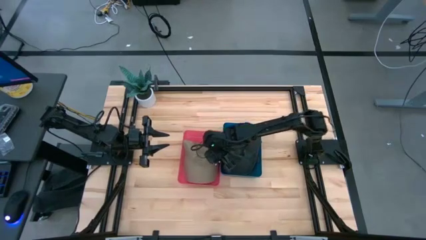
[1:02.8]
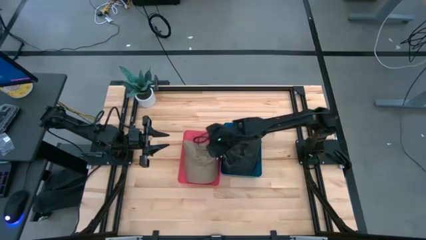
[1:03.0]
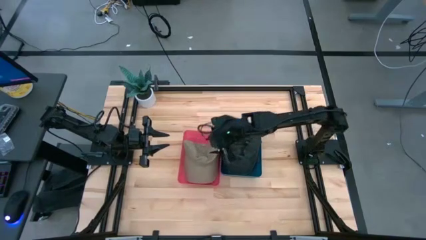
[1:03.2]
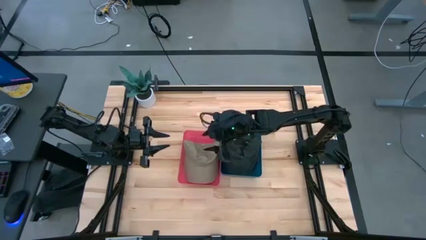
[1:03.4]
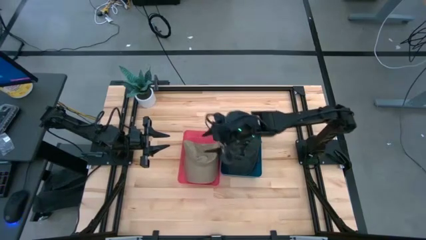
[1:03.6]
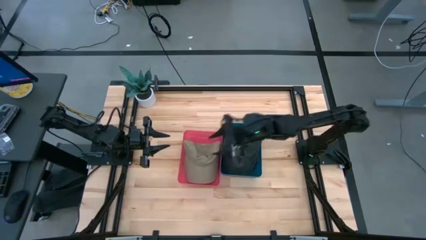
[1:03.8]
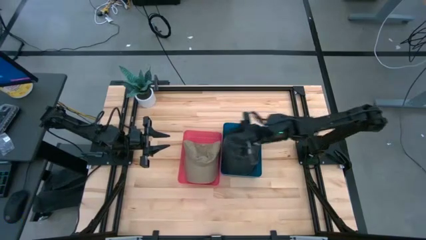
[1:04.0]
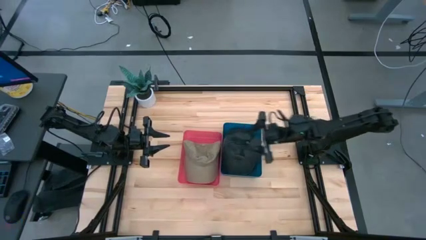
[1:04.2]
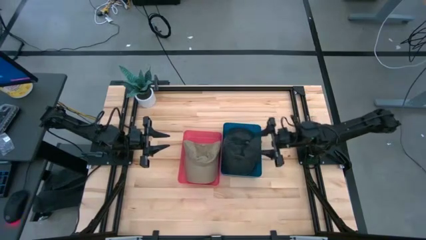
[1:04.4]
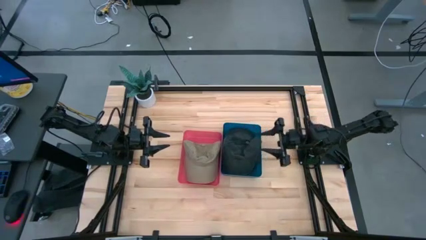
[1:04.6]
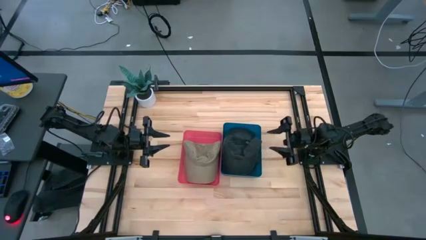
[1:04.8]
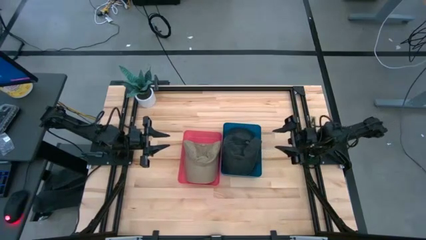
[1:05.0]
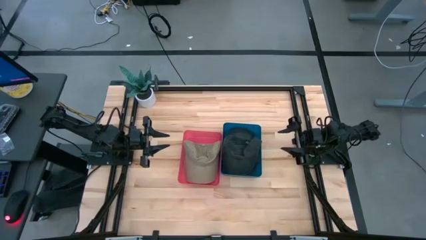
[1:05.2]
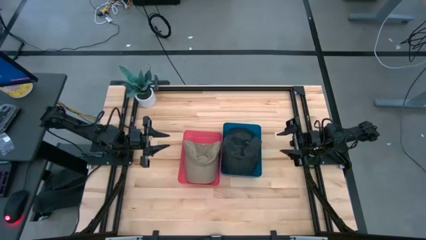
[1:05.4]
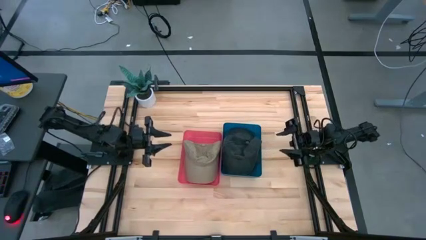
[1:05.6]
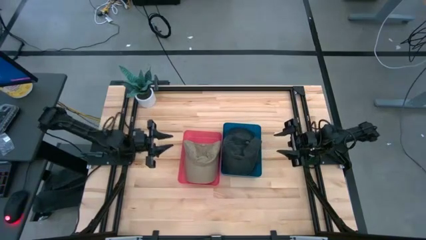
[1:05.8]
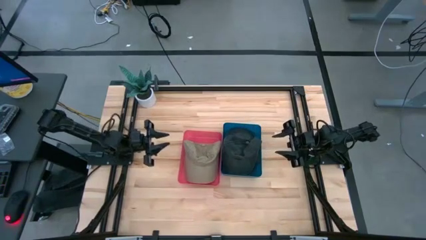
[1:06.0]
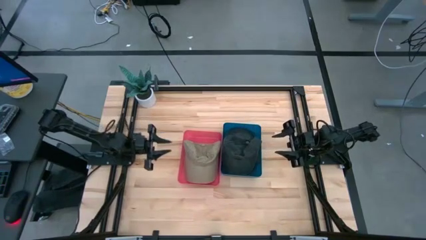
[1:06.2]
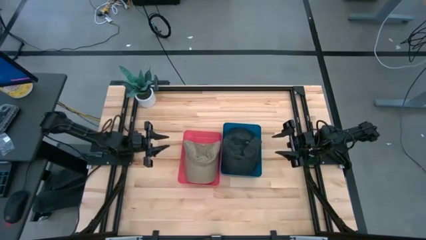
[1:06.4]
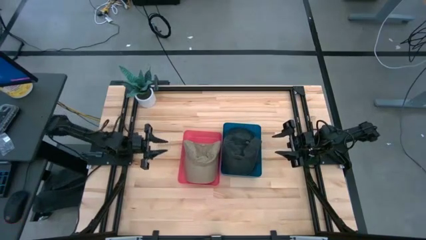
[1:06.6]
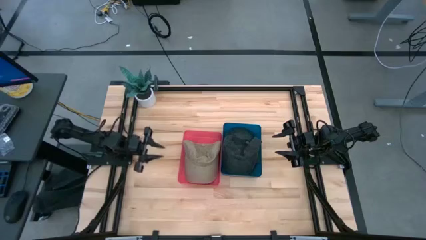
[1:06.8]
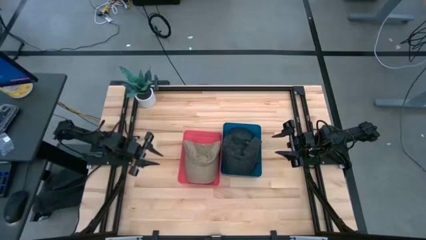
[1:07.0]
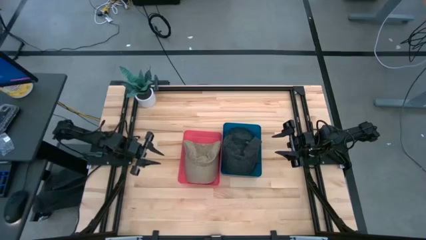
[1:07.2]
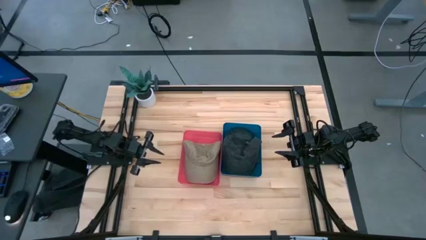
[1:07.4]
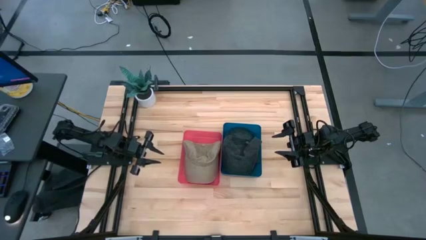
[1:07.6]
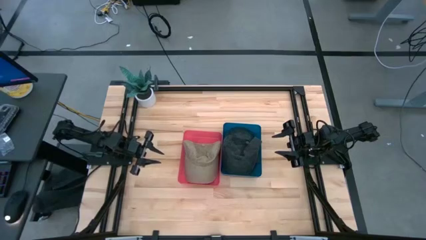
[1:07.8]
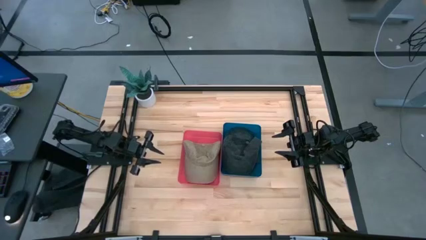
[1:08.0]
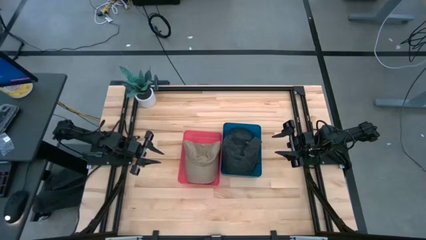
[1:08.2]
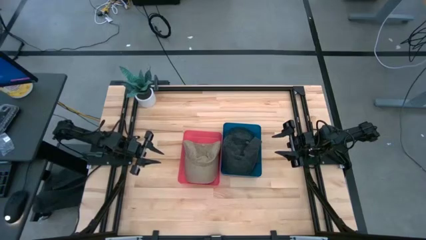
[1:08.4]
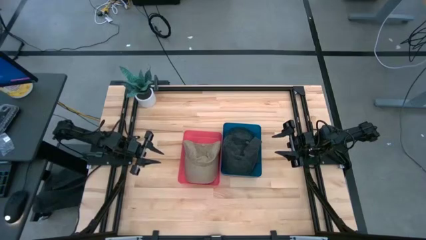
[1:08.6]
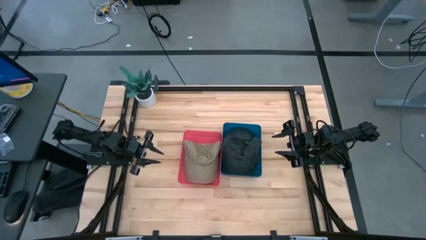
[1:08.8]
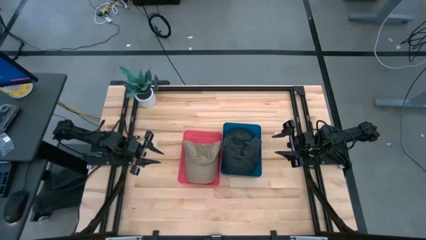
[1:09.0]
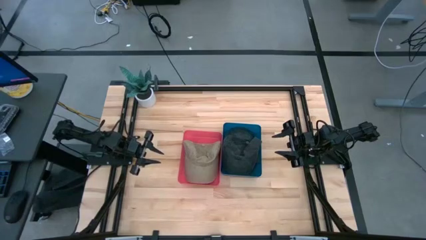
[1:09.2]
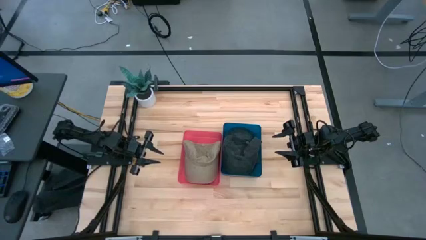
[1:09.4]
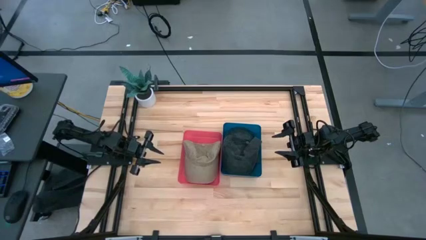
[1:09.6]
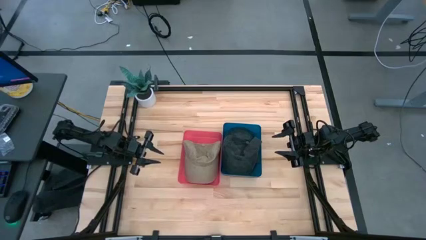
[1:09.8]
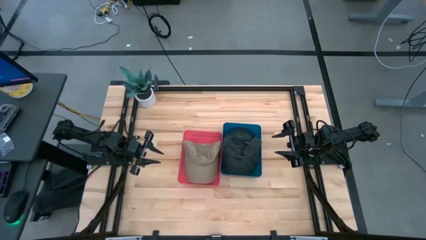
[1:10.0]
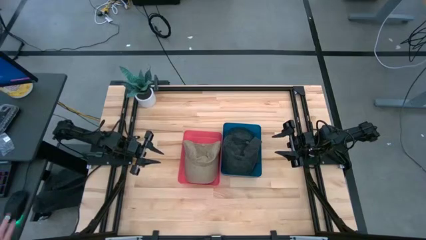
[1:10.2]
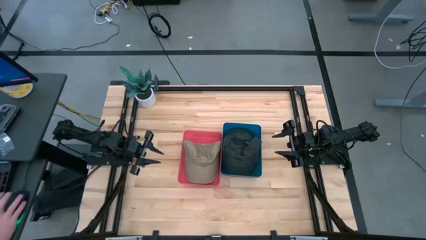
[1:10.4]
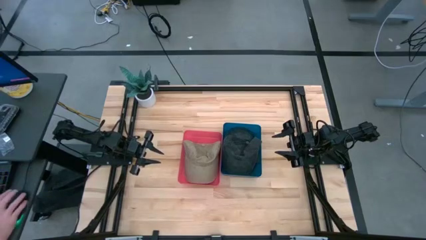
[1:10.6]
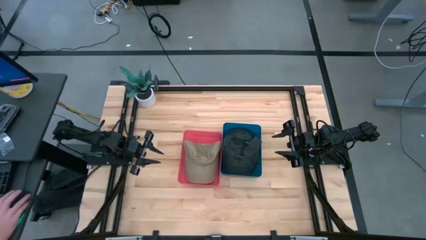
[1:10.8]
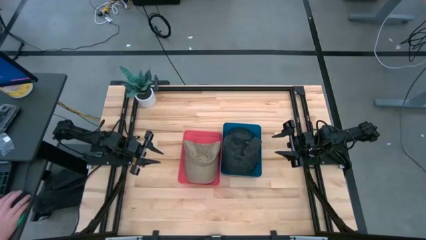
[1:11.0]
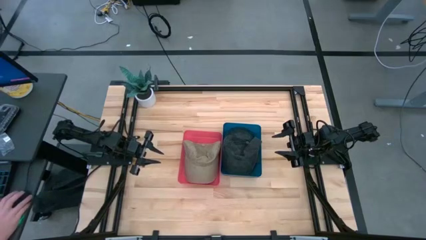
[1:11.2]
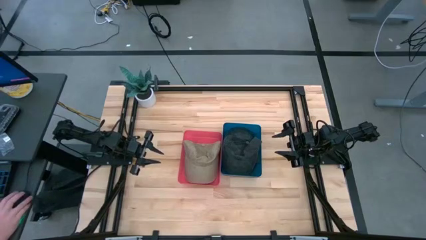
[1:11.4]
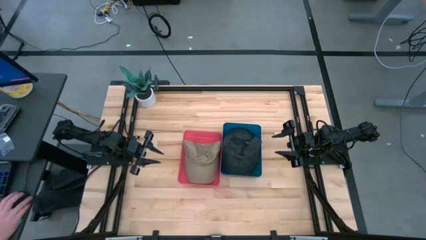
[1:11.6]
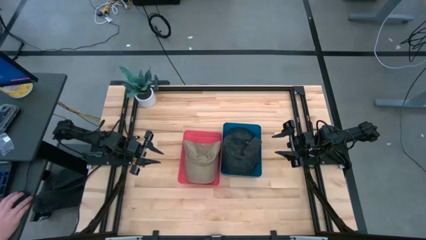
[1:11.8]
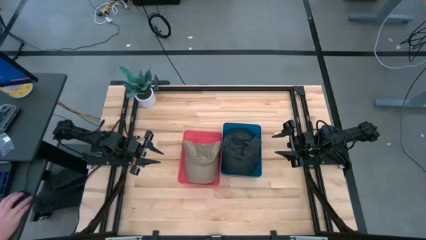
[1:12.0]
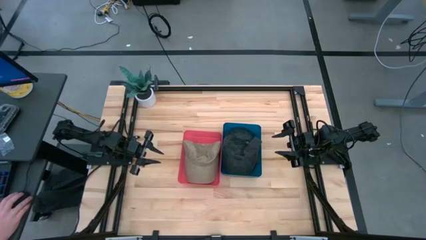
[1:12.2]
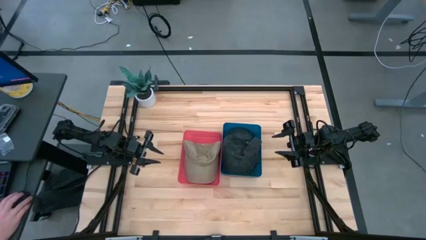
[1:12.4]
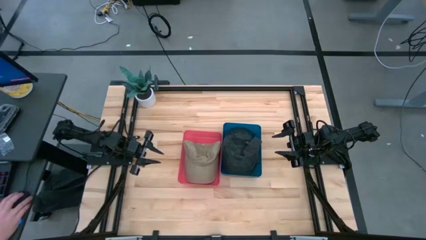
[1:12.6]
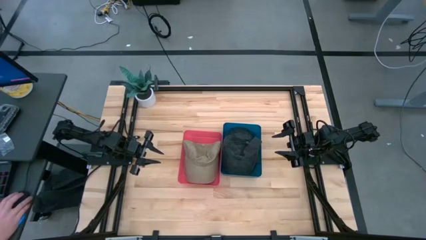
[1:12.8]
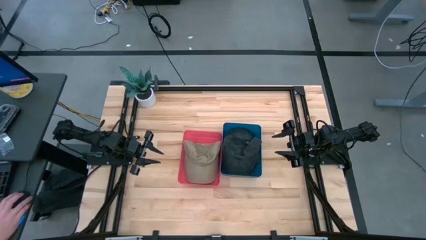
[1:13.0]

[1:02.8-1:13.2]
Task: Pick & Place hat
Return to Home Position

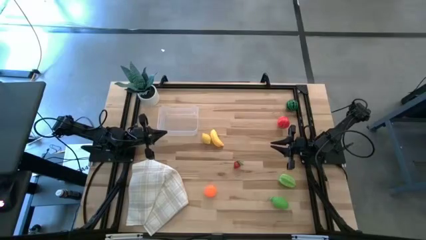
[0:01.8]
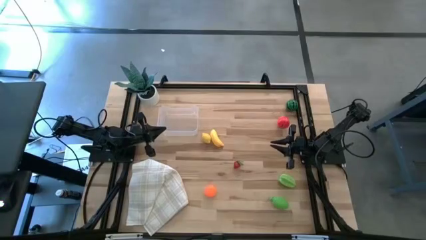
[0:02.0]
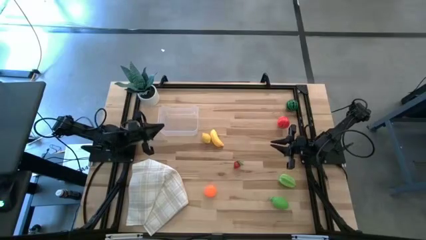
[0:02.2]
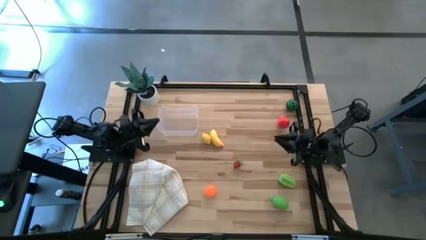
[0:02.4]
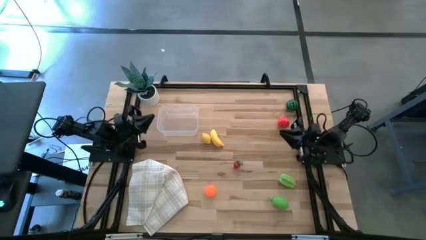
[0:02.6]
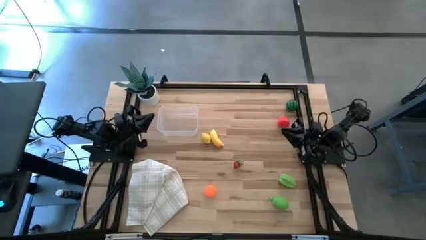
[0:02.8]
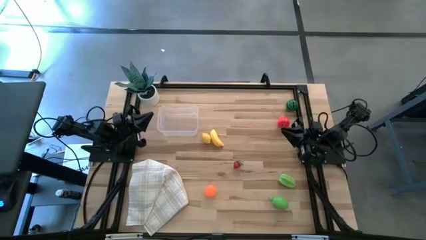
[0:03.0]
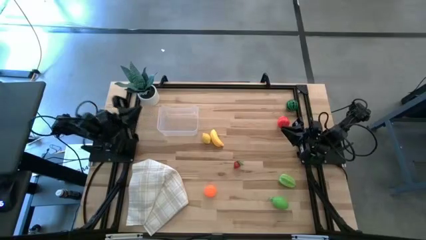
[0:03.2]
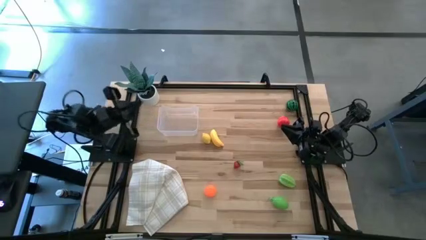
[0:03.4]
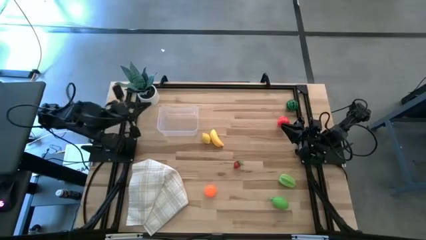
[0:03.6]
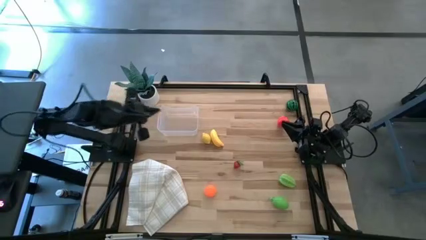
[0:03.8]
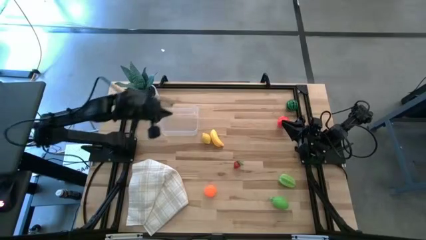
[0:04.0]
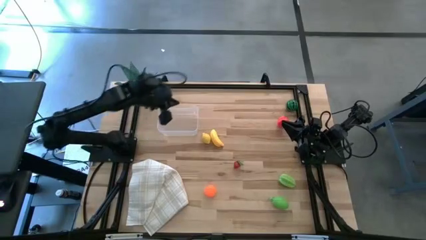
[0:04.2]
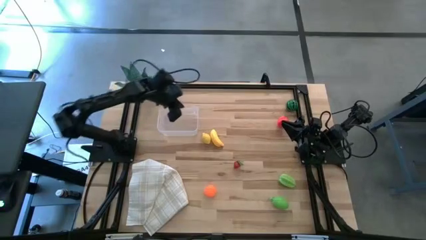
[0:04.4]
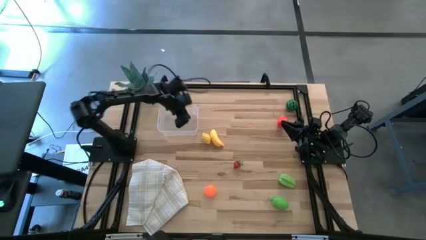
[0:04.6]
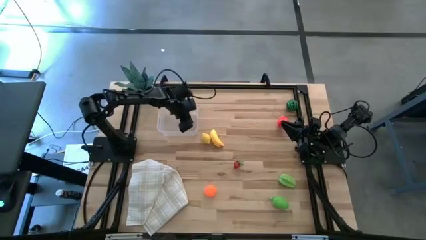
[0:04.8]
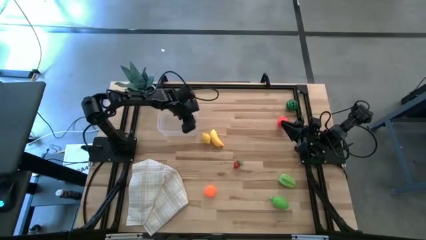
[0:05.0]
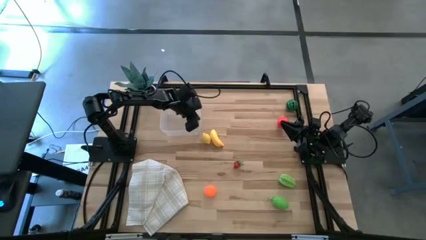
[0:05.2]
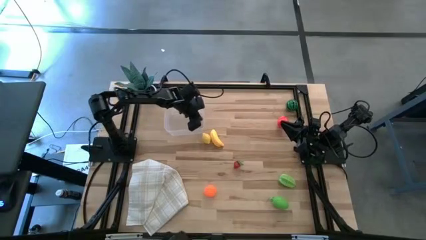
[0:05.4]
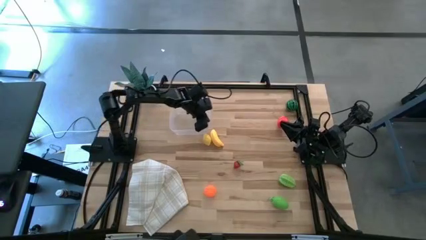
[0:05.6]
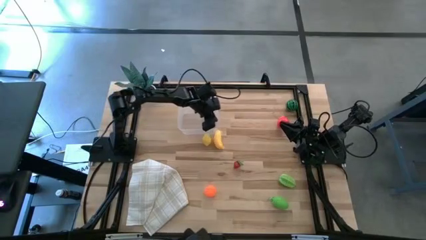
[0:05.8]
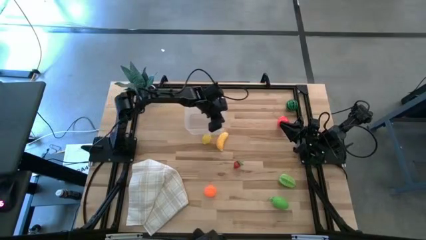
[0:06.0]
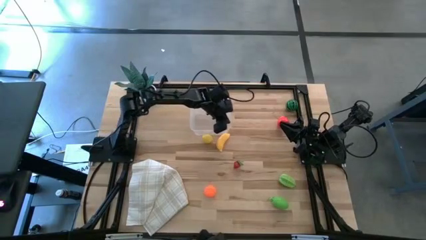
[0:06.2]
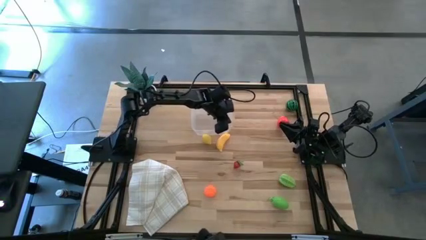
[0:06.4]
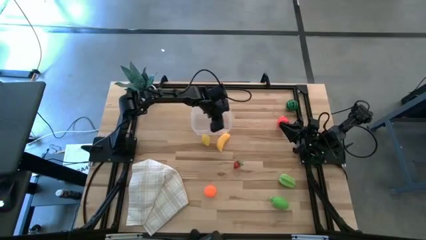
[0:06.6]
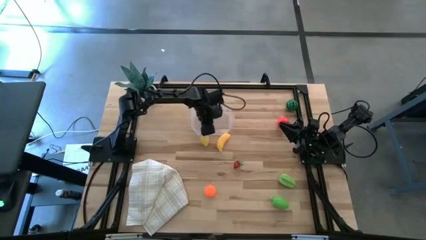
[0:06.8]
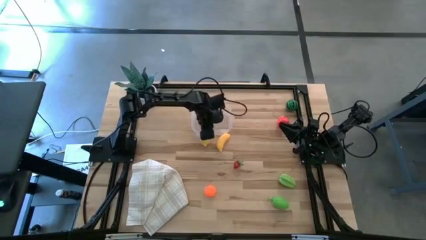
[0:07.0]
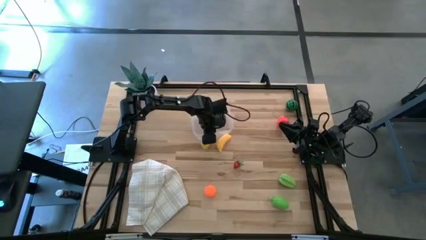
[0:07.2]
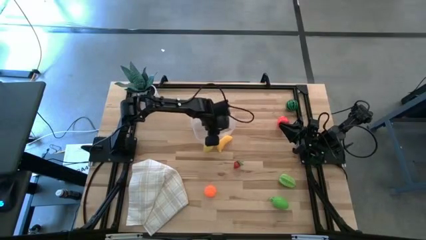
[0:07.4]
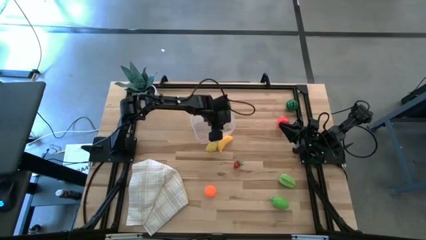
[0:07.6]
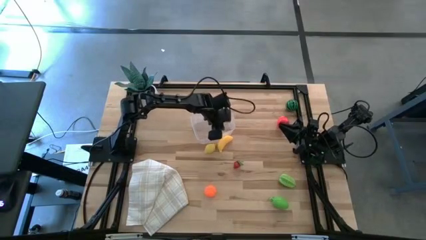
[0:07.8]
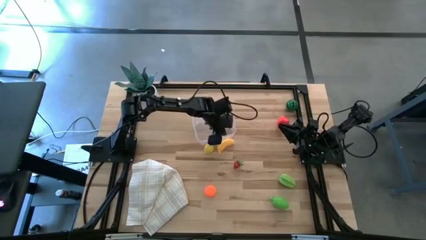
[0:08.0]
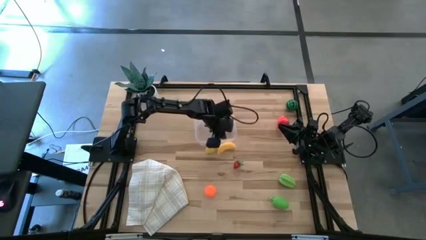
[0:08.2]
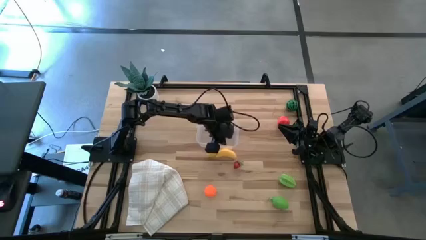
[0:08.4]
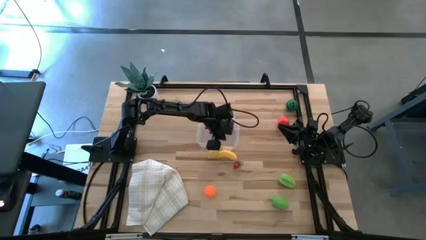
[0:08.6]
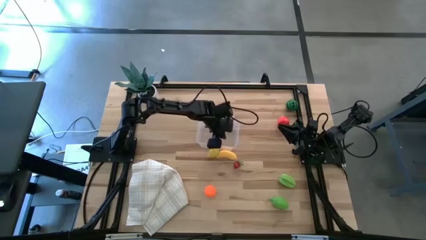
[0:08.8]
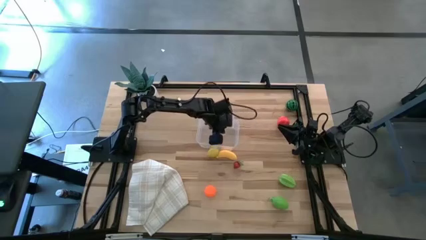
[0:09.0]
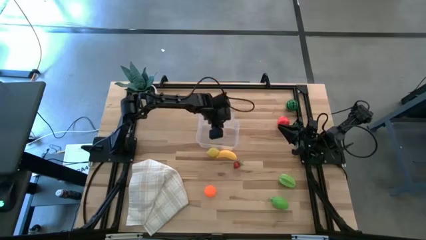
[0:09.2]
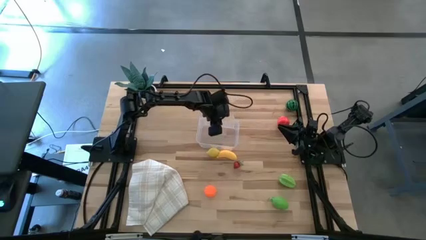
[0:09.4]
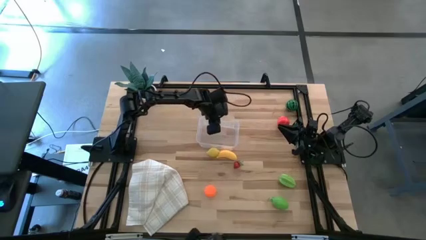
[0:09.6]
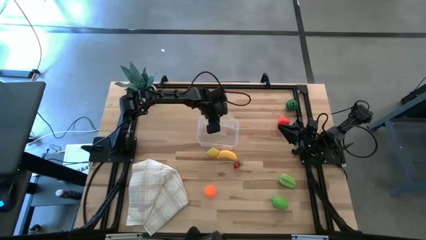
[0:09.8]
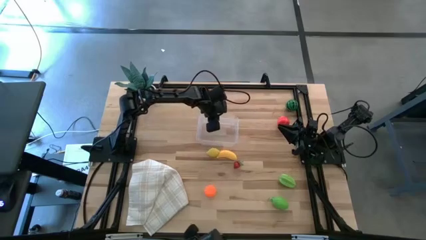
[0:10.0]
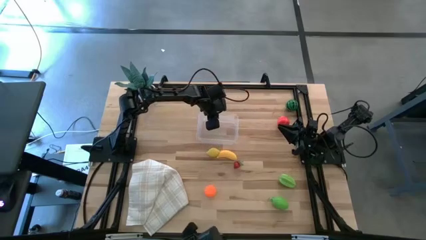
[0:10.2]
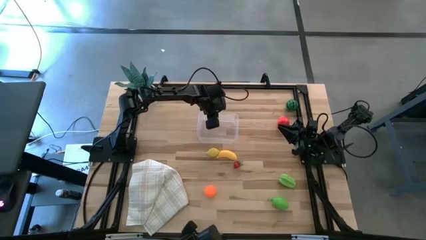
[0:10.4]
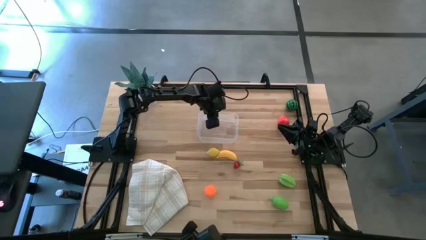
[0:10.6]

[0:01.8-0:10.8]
Task: Pick and placing Produce into tupperware
Move the transparent bin to the top center of the table
